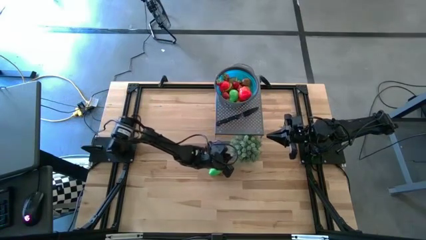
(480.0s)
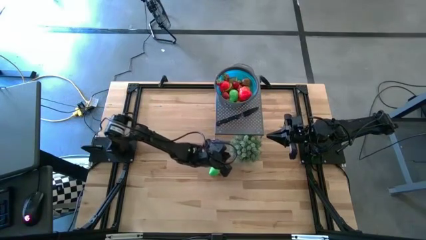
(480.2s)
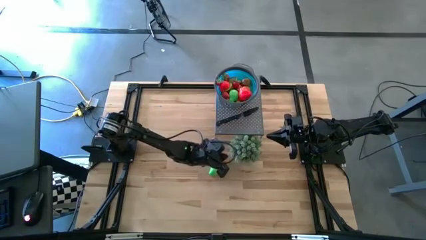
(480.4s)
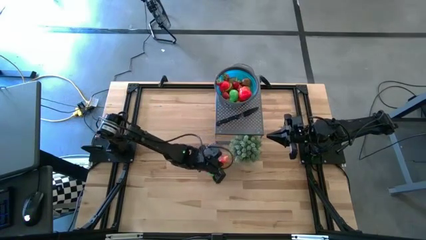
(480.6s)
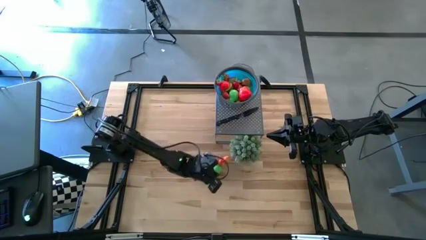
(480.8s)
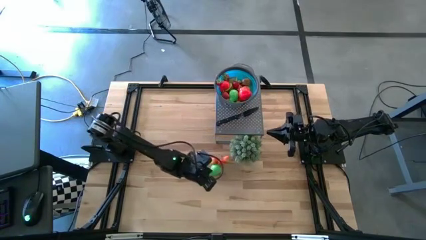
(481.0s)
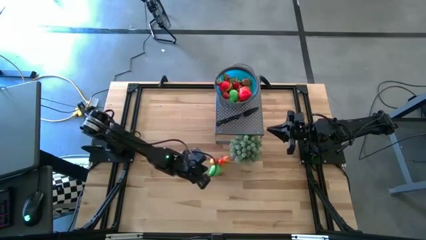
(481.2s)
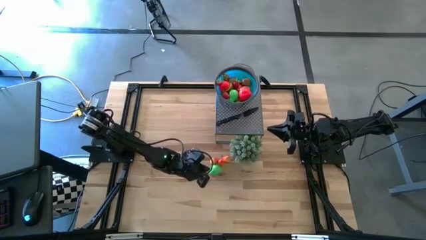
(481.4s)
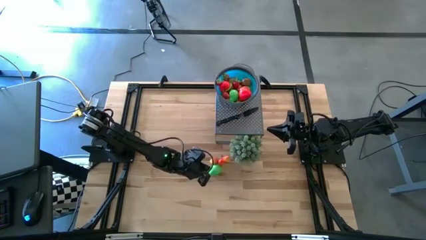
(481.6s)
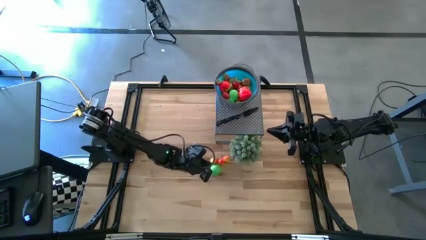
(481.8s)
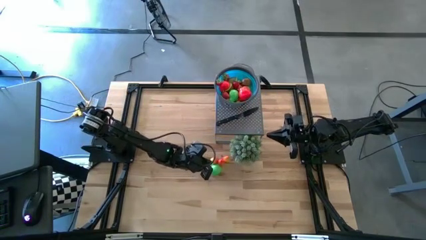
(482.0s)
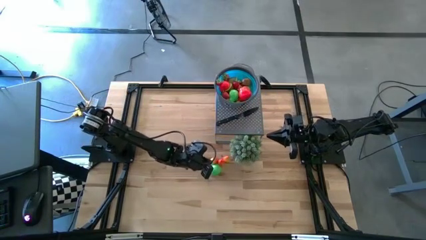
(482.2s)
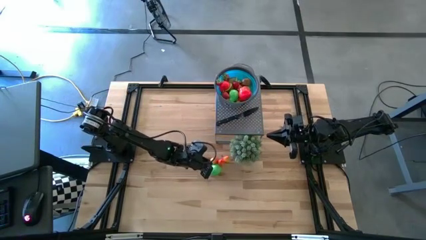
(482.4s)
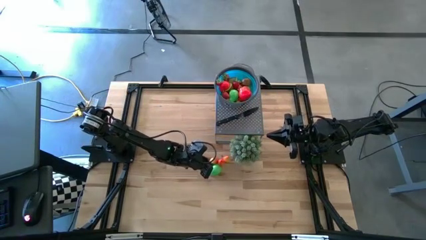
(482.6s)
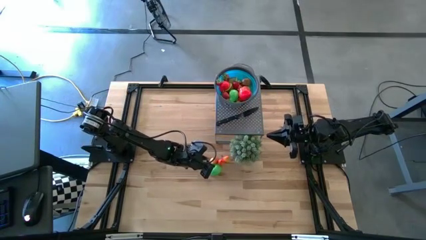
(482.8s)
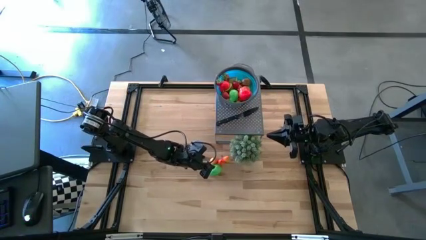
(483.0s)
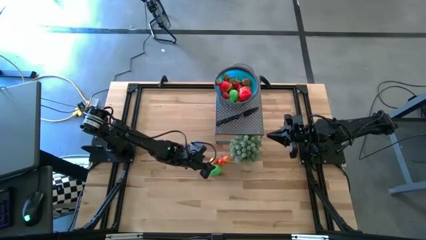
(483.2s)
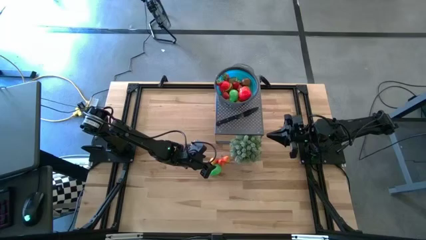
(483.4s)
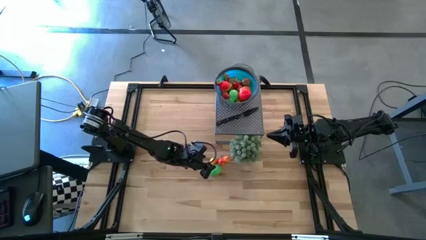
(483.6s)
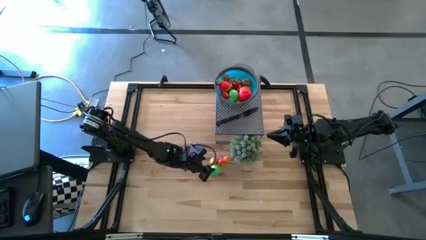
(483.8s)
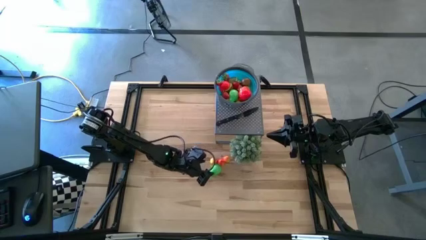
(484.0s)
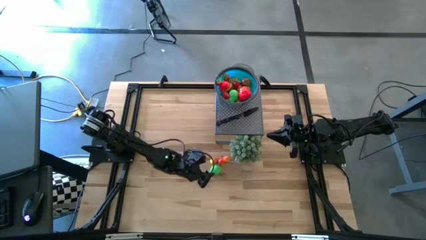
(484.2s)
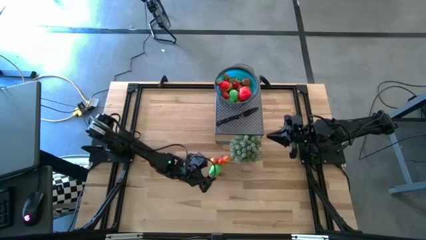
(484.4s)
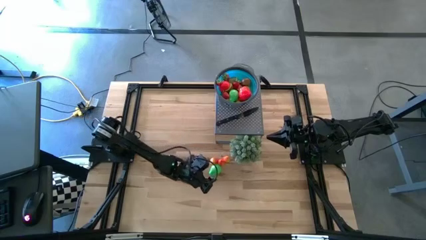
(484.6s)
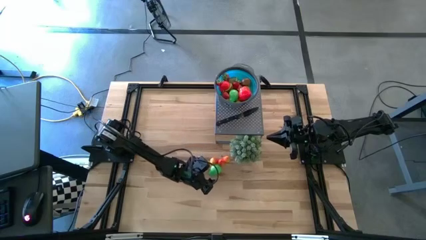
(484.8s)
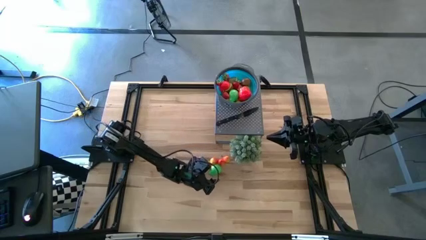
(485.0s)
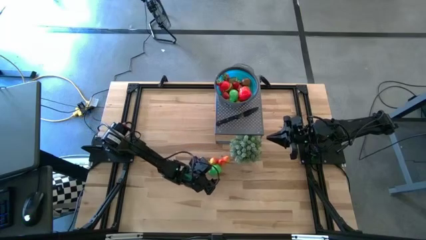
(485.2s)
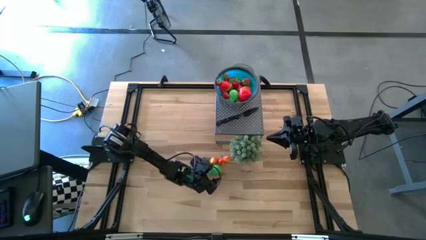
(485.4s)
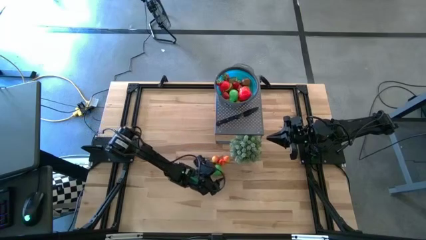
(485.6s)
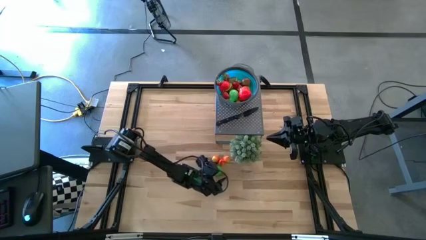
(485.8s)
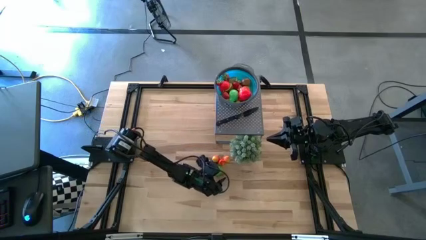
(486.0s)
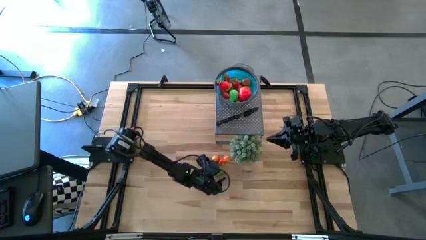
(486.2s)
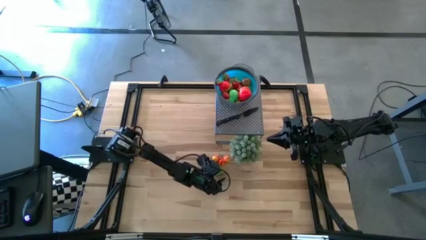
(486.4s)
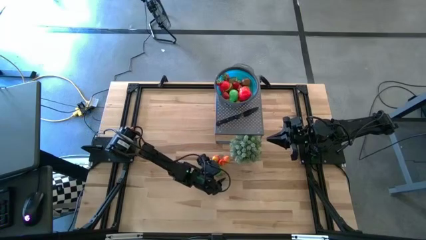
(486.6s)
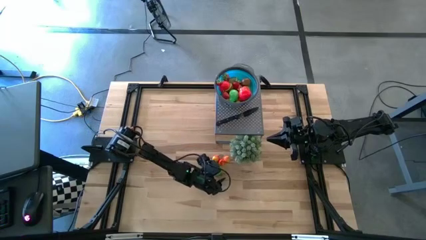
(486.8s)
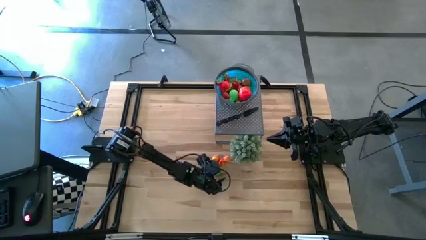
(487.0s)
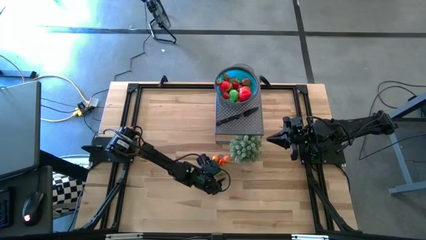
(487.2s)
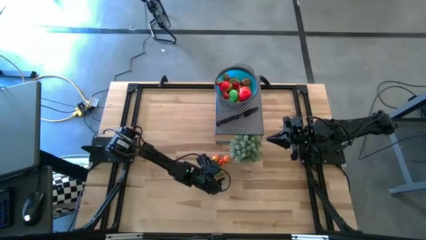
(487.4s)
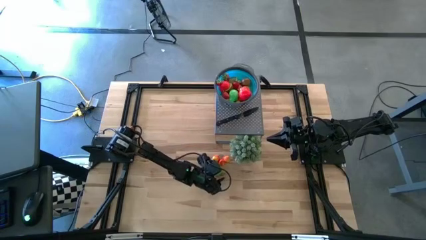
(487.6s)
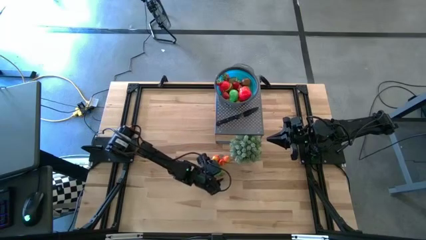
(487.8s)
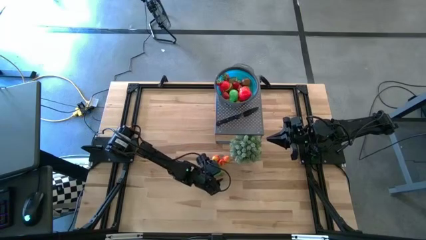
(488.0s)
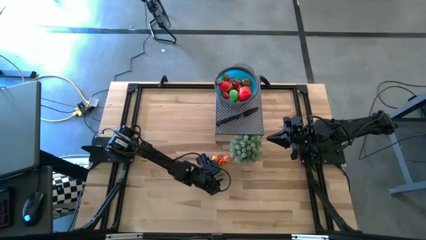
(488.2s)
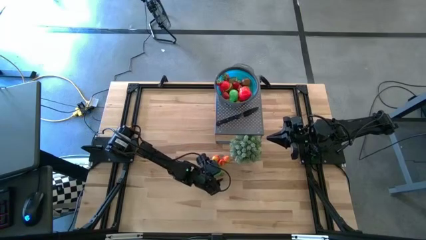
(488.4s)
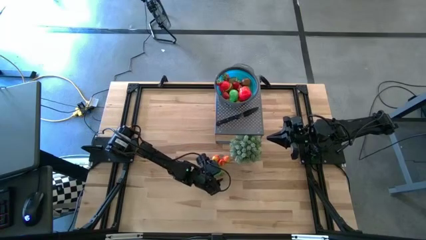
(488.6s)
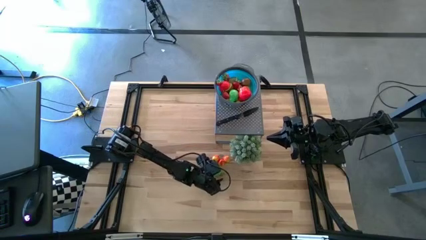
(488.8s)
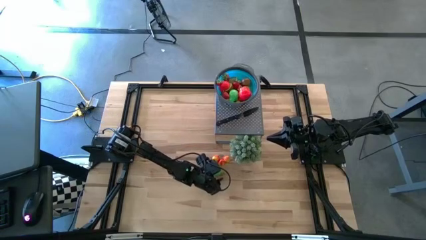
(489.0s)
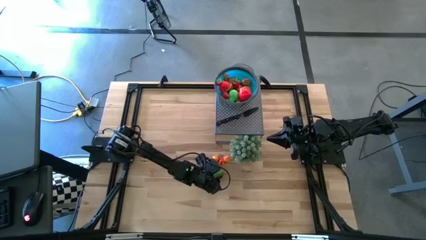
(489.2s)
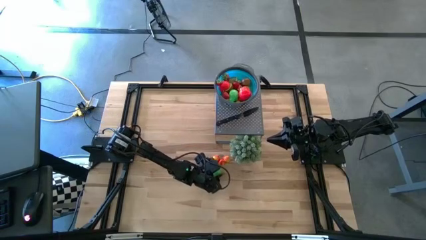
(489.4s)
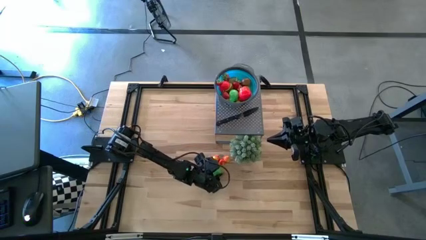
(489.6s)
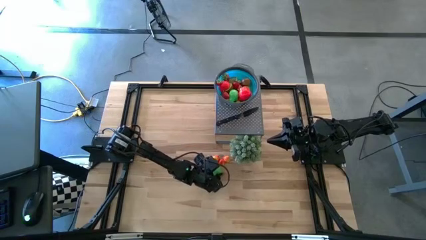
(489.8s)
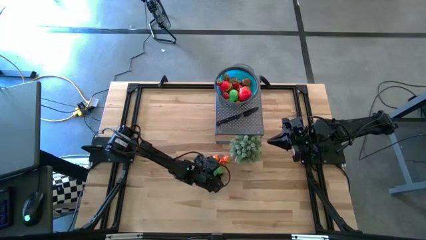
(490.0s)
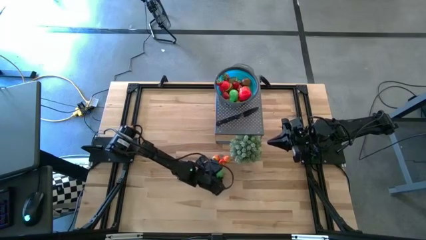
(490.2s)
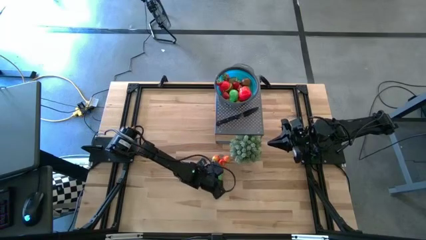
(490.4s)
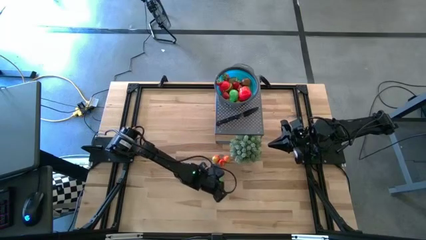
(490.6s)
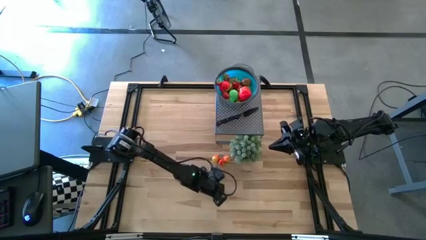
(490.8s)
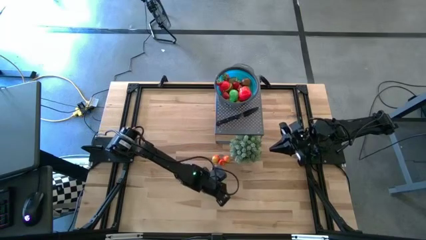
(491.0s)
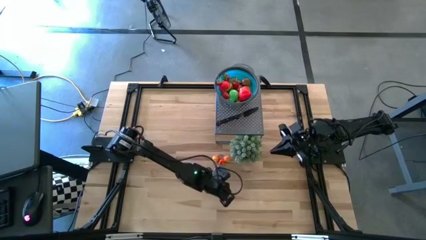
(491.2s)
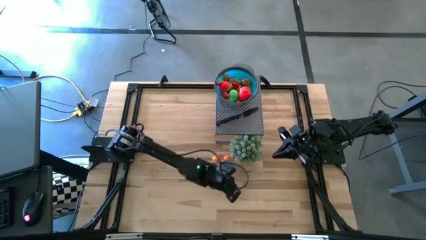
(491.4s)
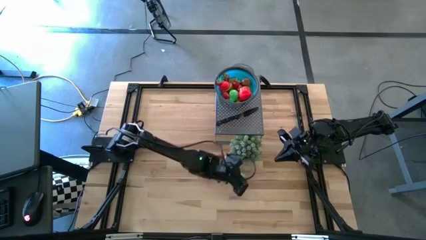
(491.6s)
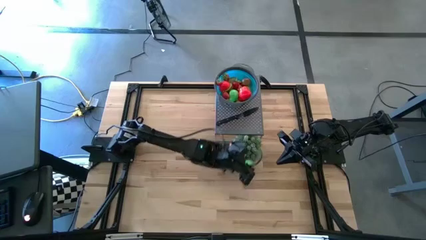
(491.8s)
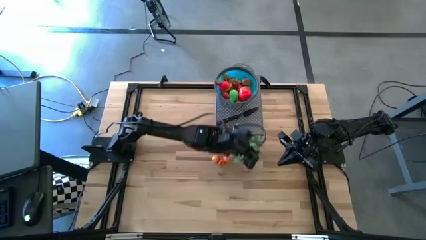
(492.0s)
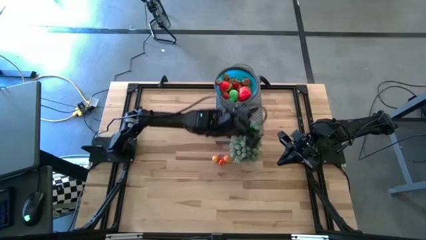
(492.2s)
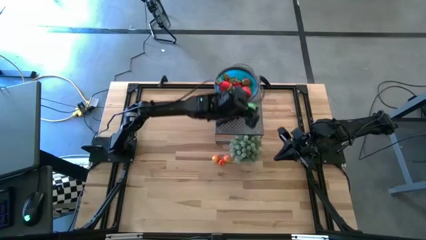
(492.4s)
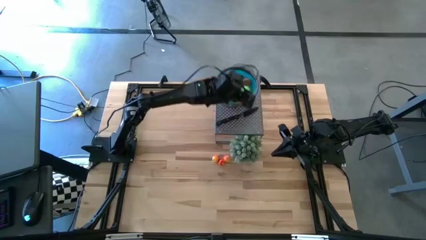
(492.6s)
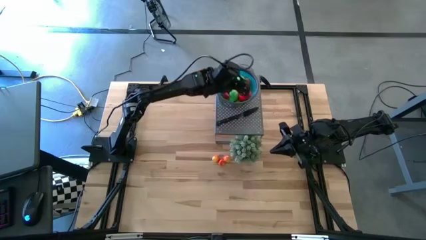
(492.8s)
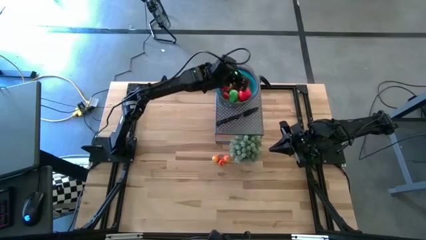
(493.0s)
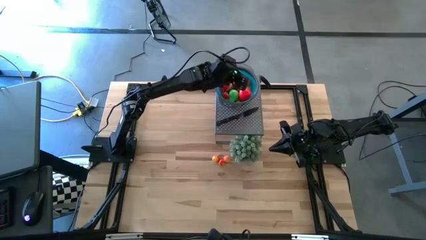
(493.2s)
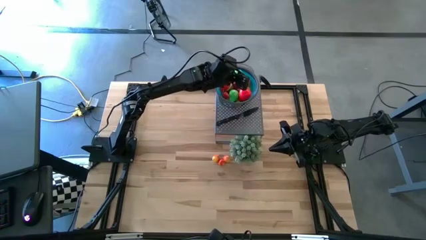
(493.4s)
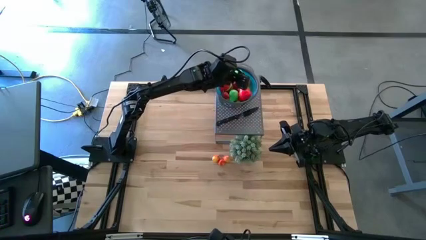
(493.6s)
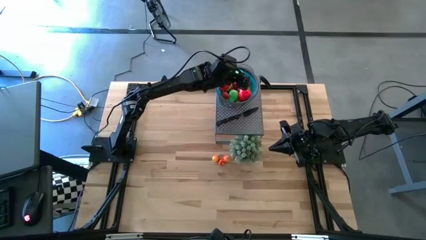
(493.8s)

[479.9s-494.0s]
Task: Pick & Place Fruit
Put the green pear into the blue strainer bowl

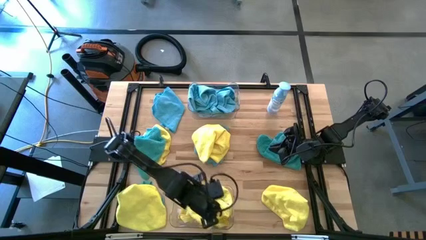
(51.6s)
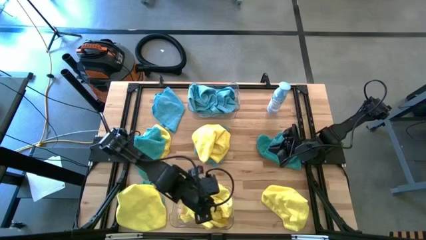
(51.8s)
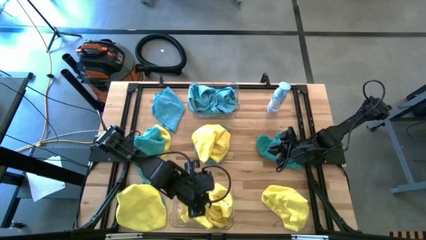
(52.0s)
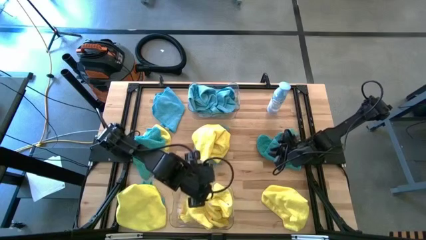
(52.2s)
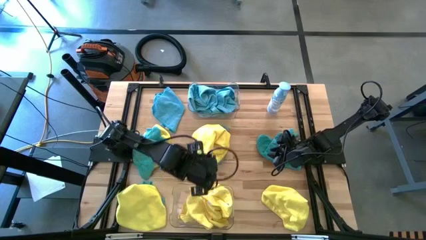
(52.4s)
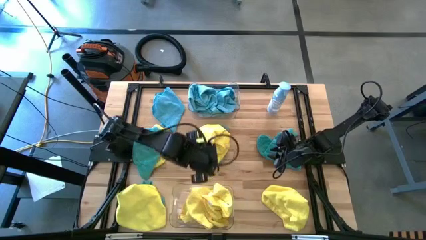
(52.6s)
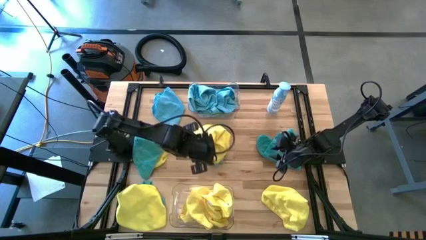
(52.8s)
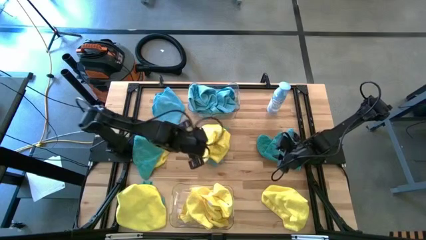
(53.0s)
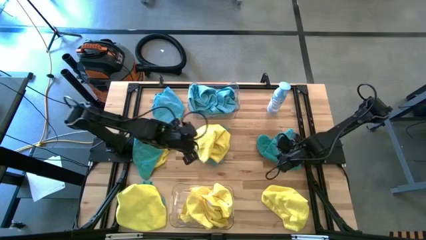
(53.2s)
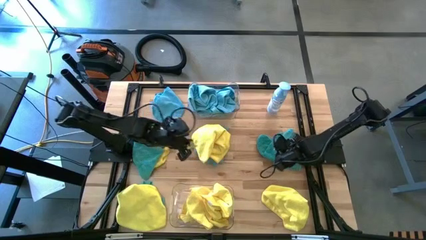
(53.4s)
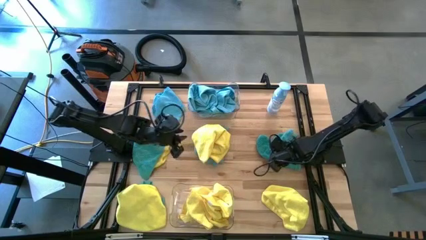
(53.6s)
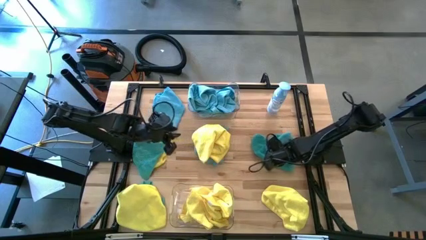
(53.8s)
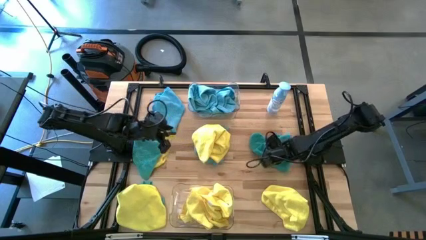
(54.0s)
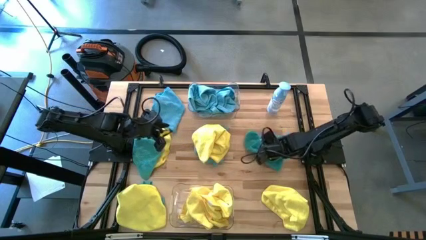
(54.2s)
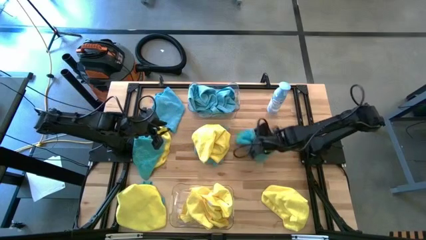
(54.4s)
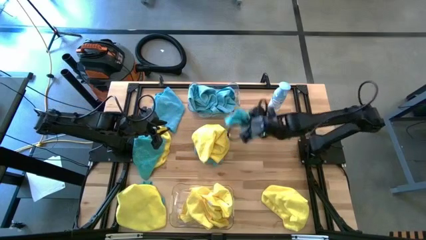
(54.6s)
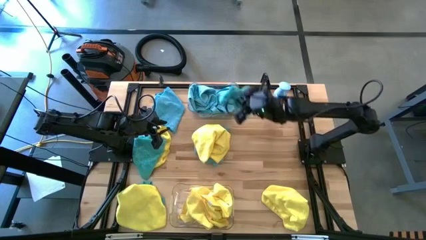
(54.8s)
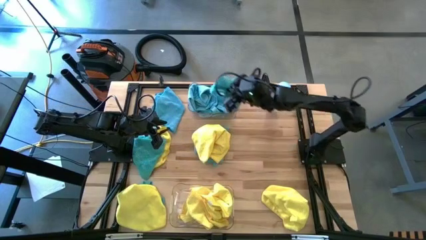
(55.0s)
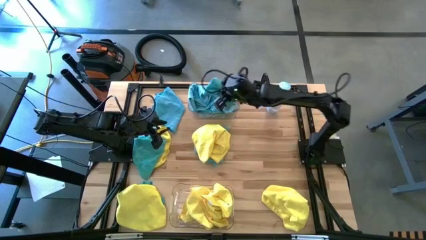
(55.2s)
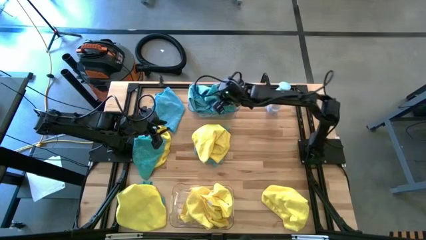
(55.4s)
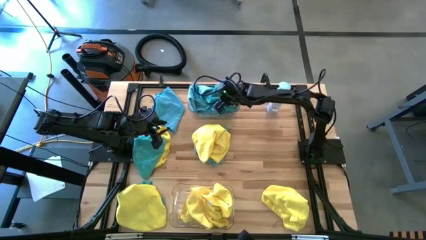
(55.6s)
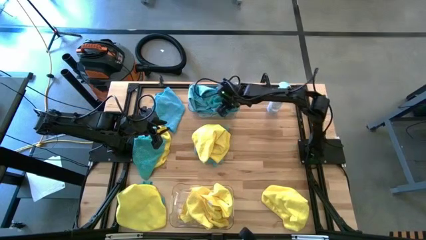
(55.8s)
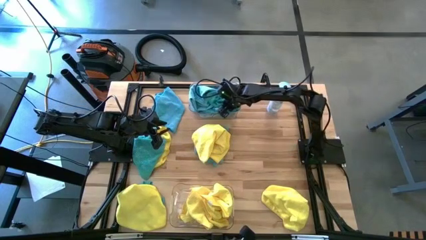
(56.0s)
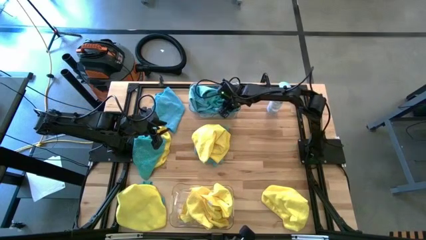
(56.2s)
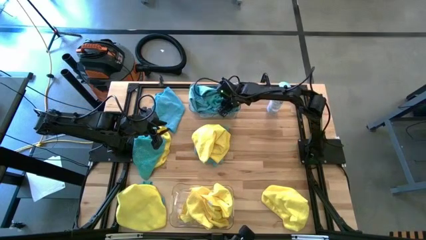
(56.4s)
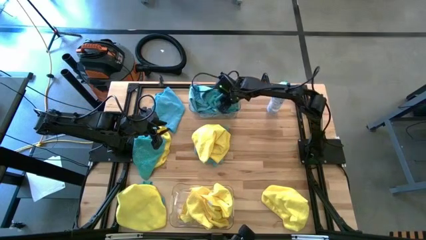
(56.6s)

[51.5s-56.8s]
Task: Sort microfiber towel by color & place in baskets
Put the blue microfiber towel into the top transparent bin
